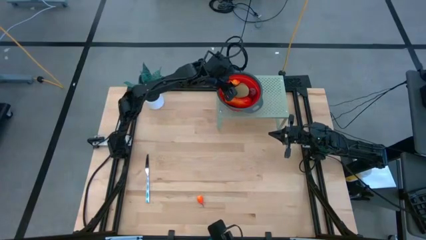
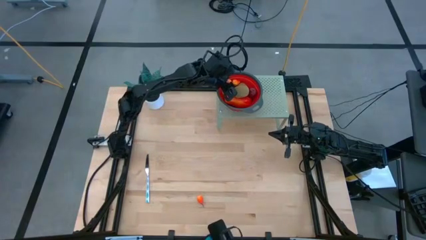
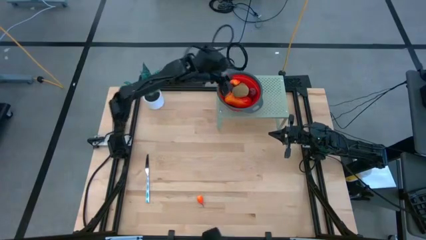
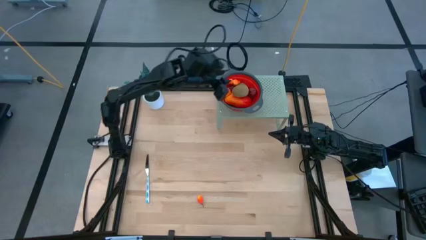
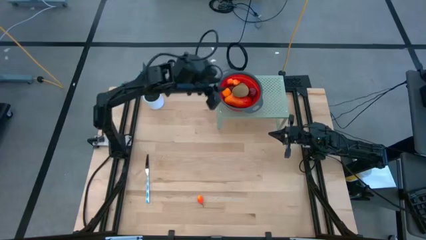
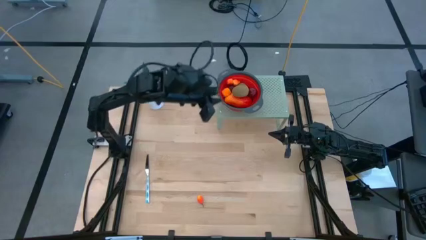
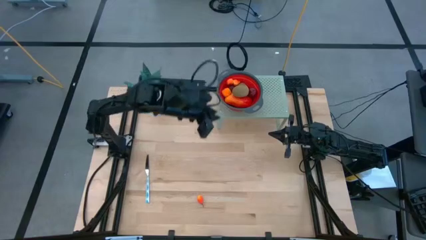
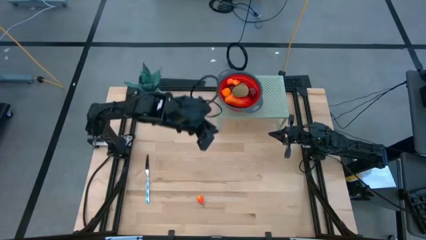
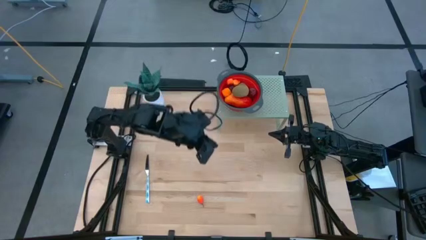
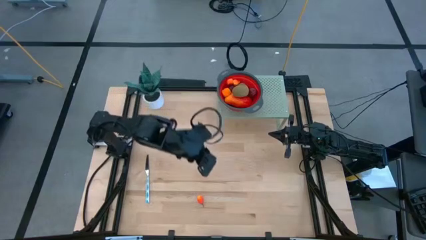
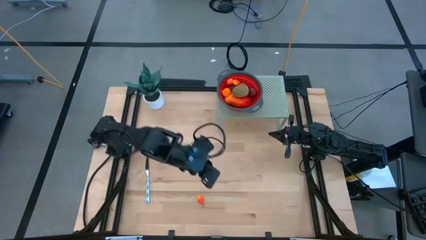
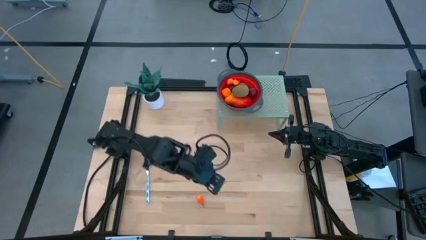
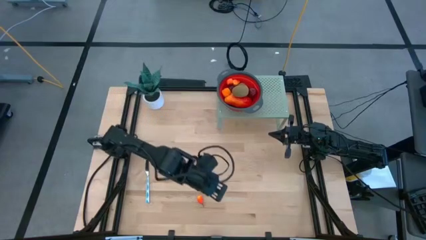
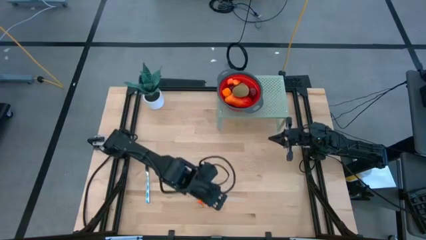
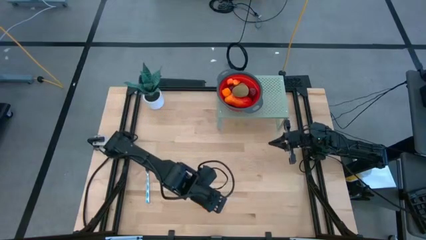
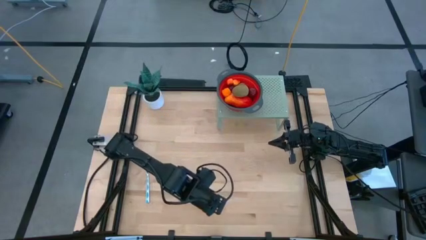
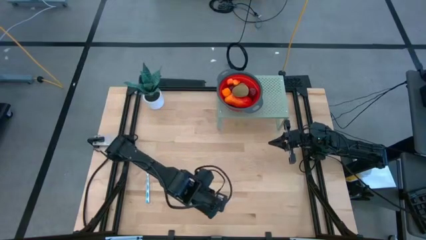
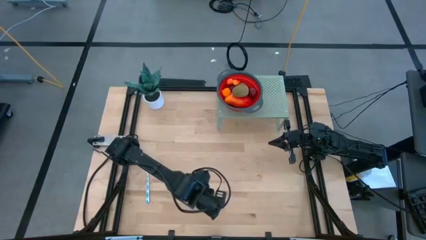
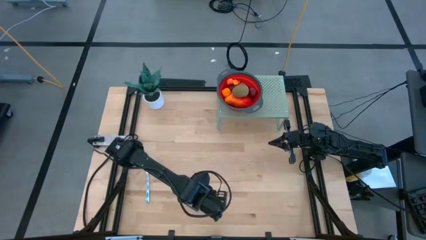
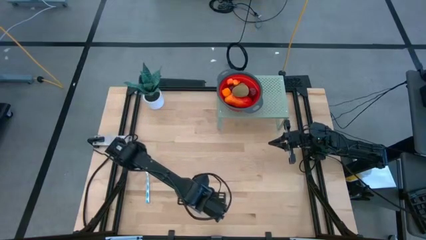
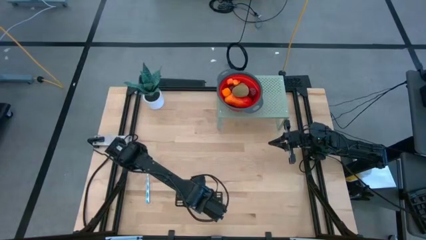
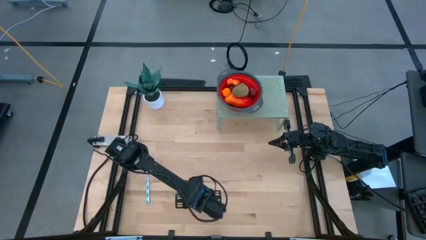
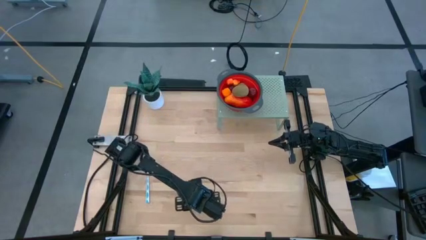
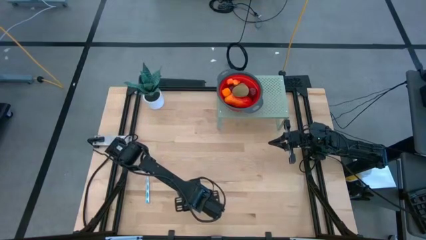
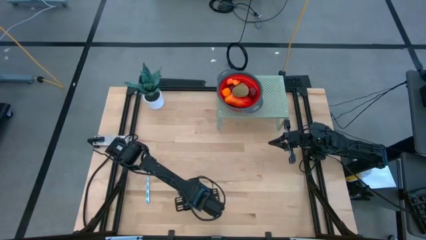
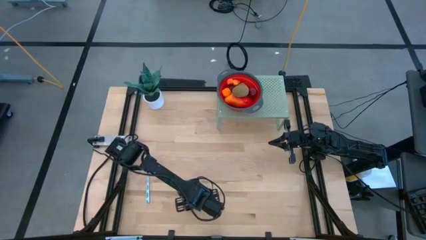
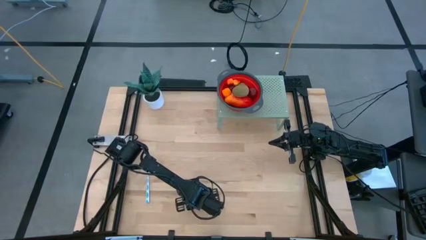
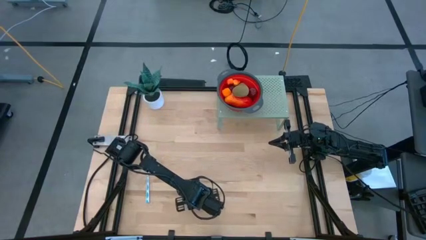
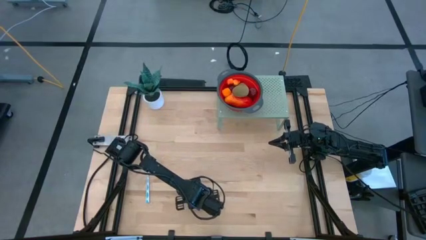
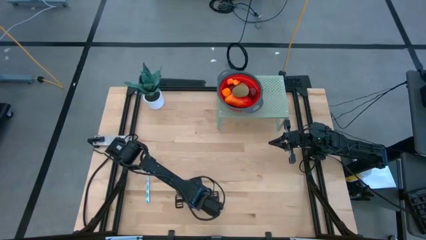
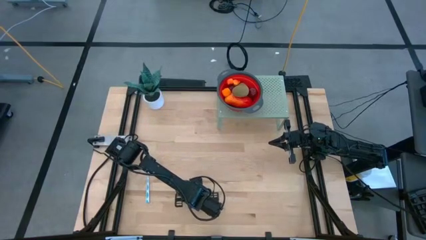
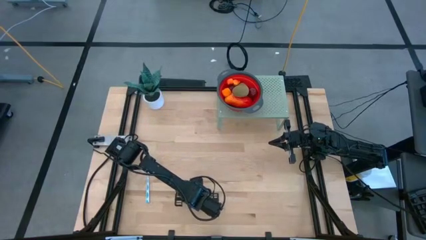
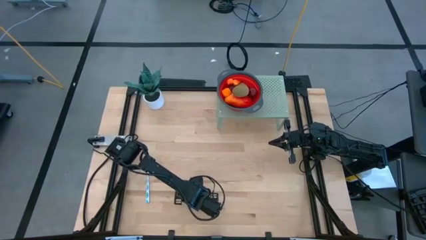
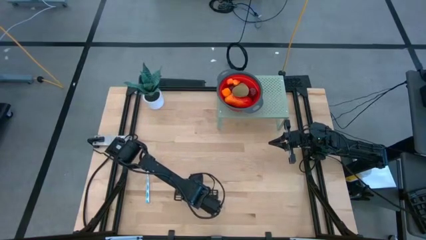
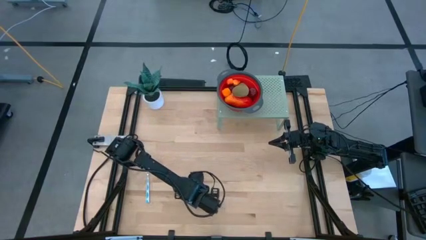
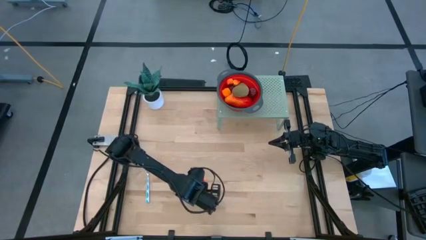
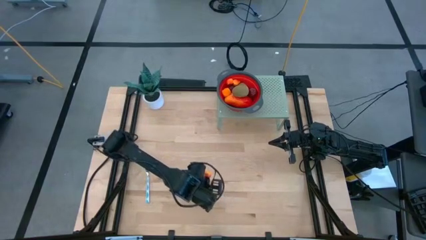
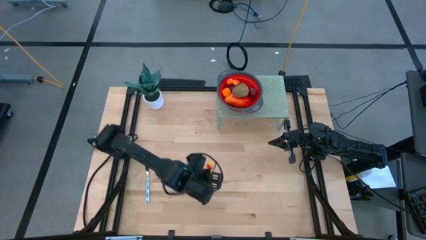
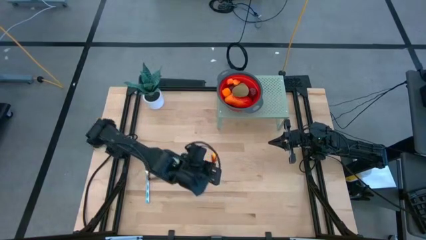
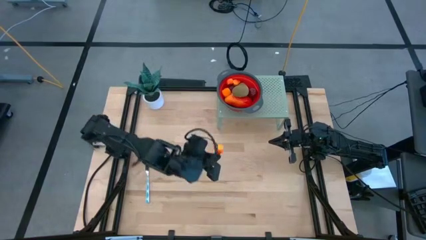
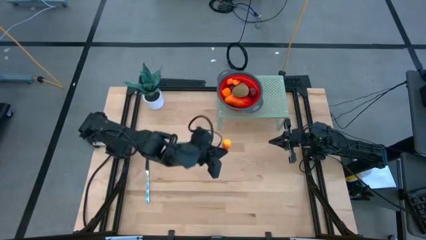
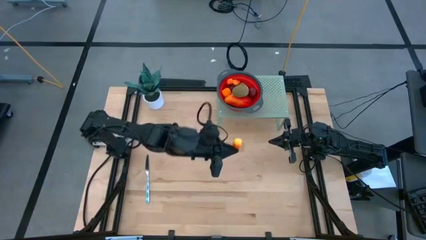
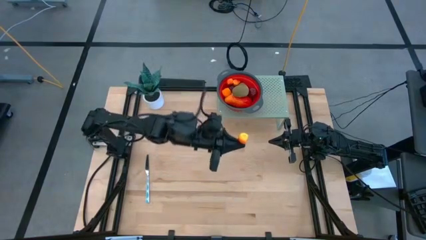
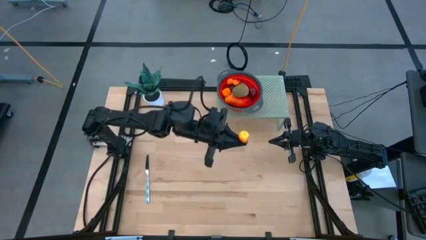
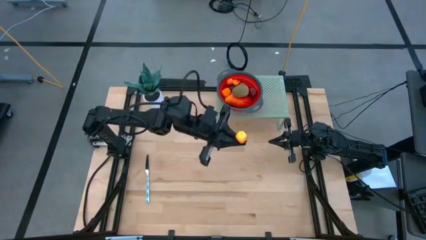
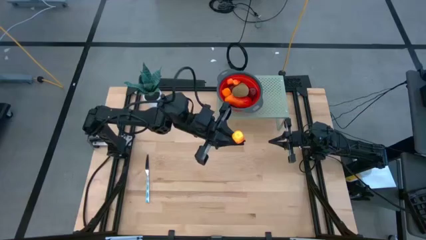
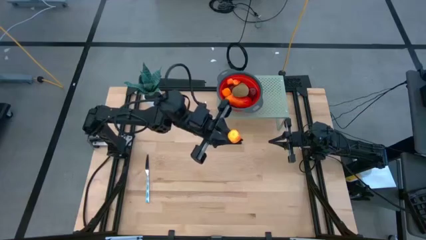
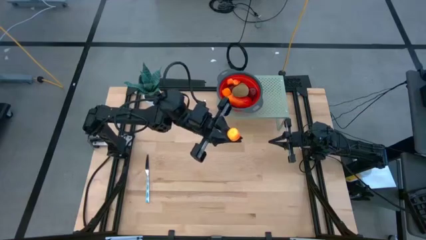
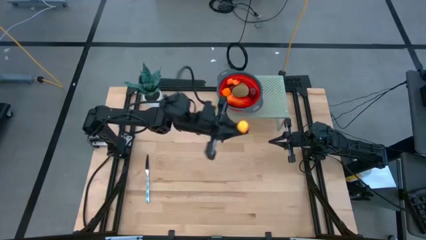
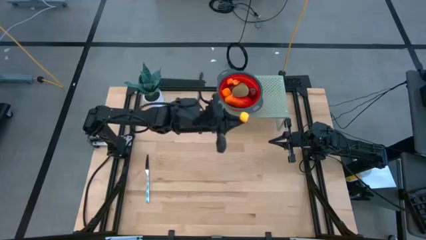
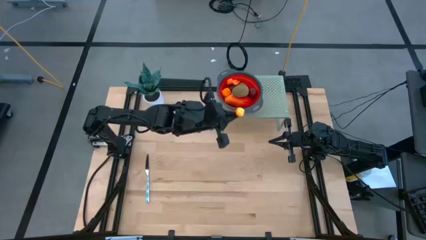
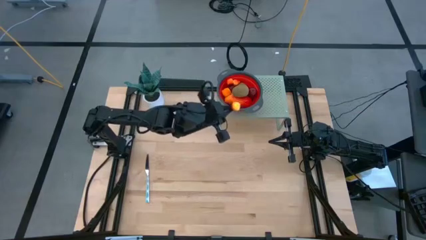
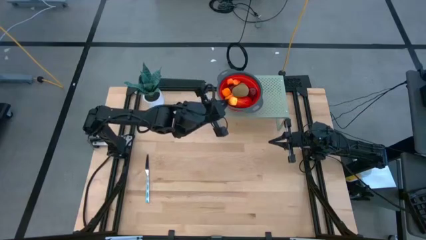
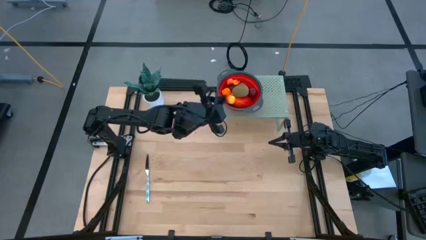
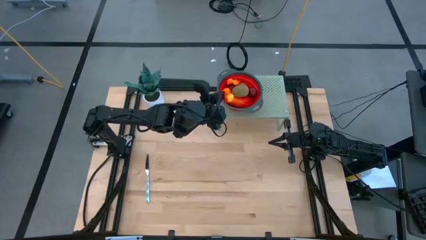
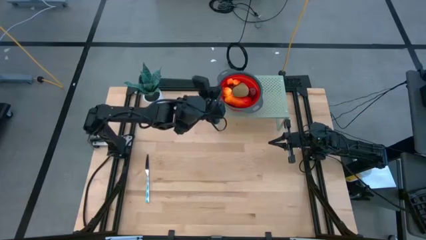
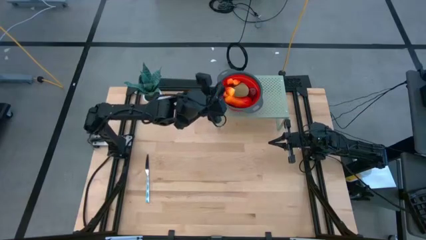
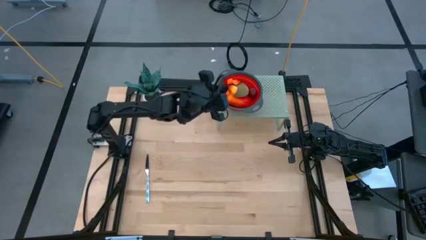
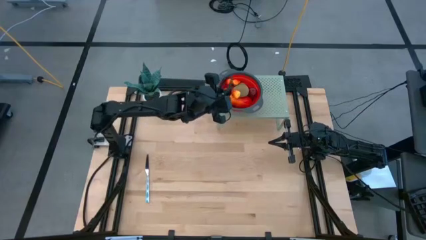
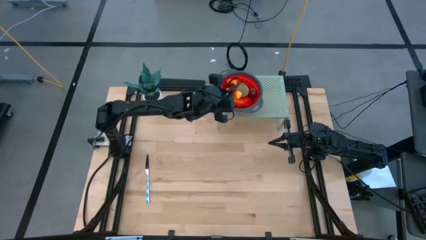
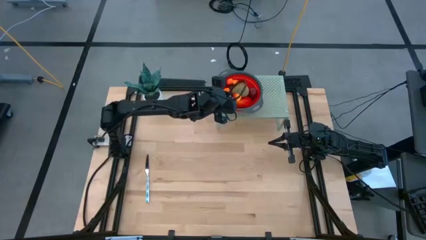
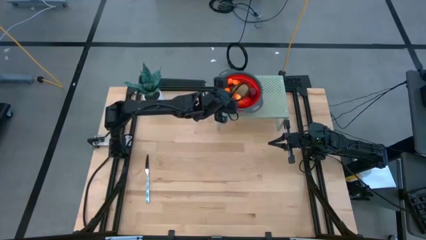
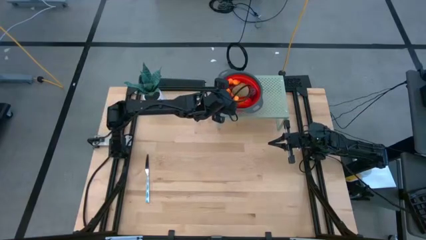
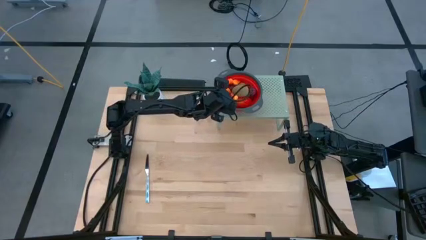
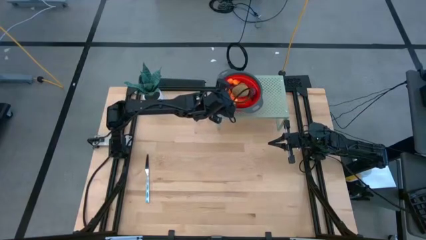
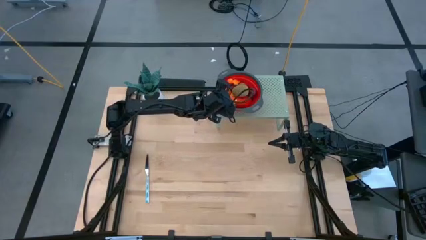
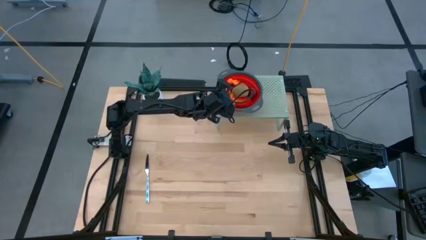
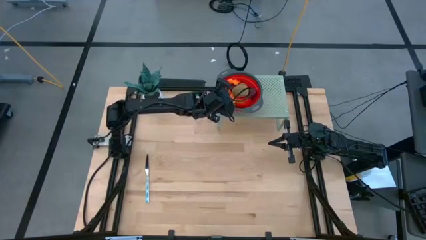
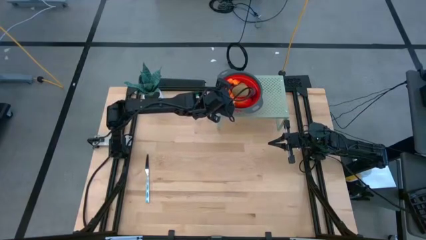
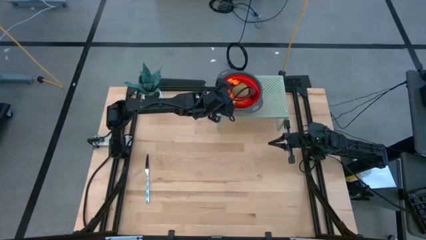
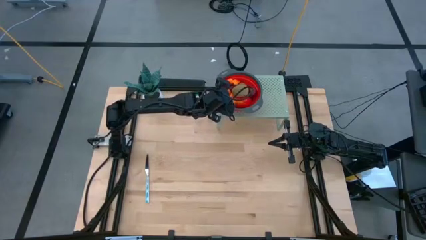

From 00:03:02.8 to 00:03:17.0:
Task: Pick & Place Fruit
Put the yellow peach into the red strainer bowl on the shelf

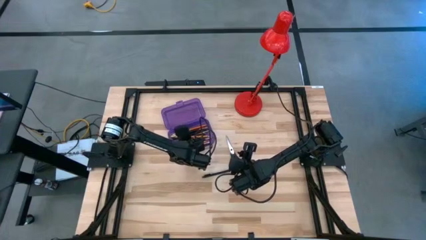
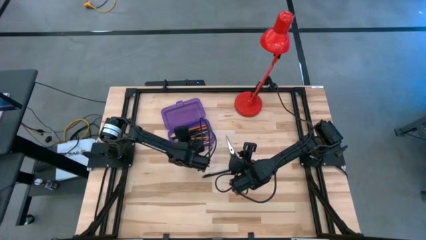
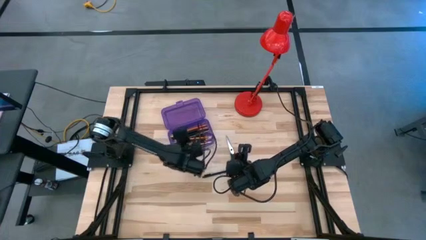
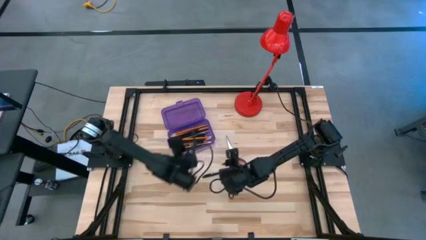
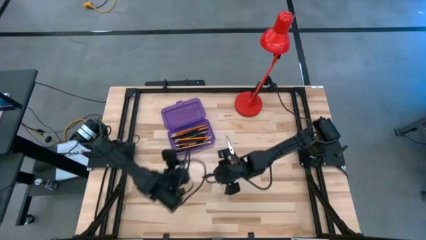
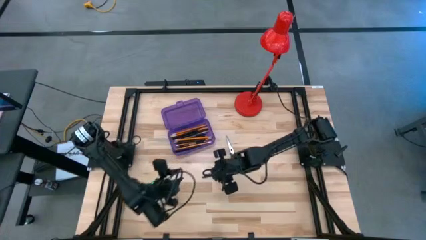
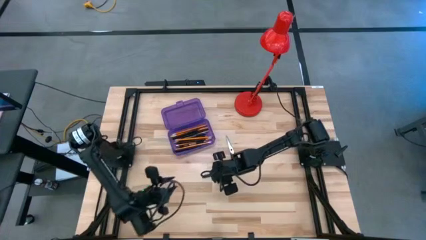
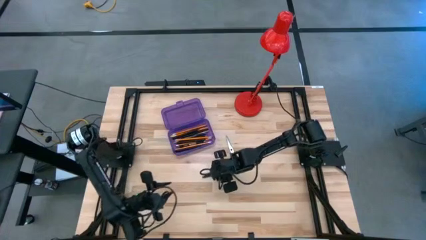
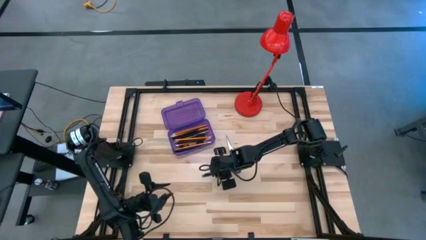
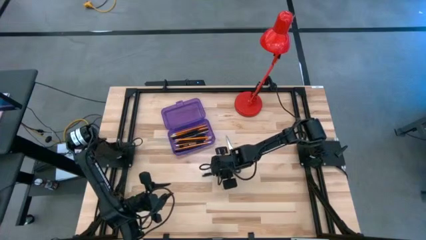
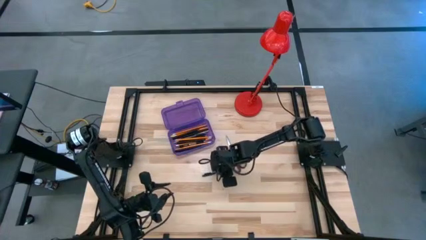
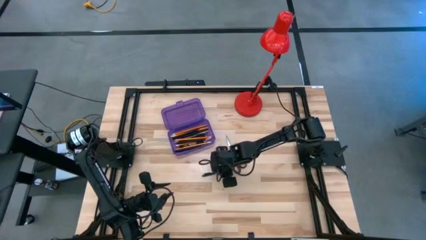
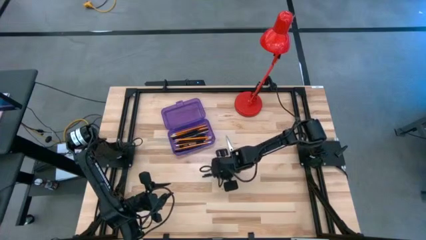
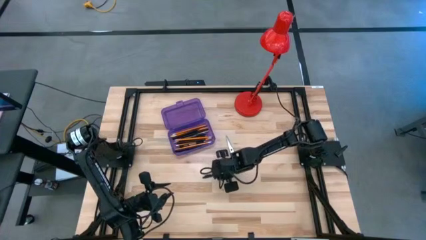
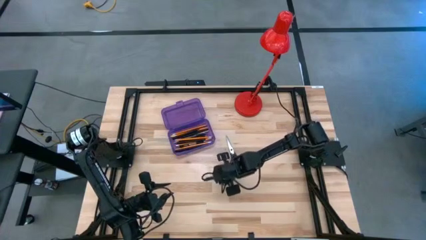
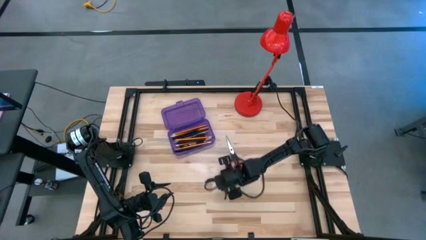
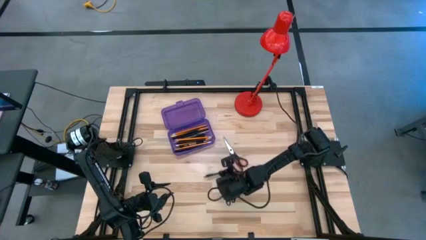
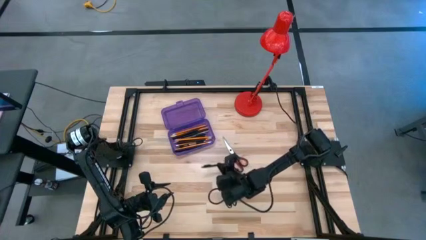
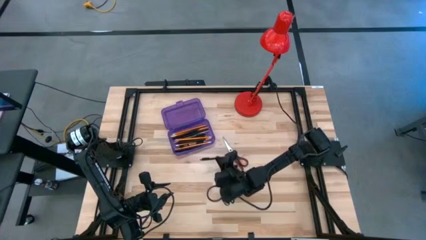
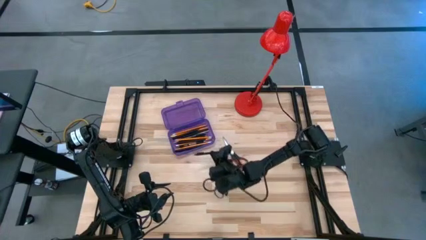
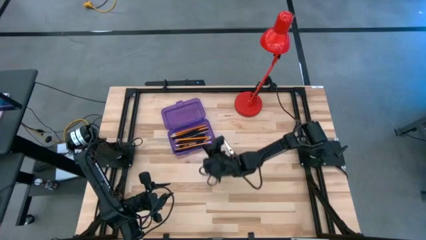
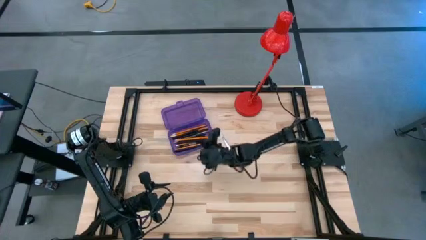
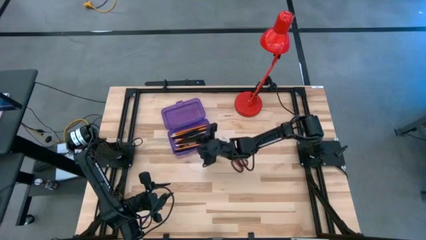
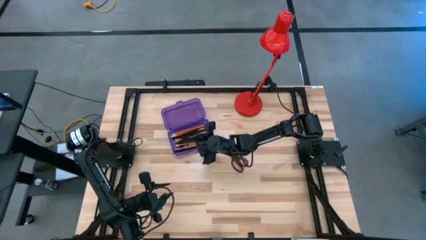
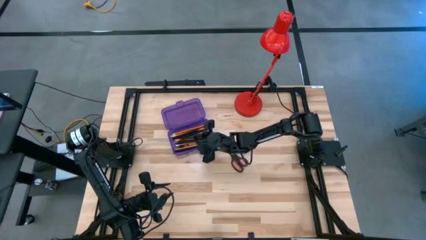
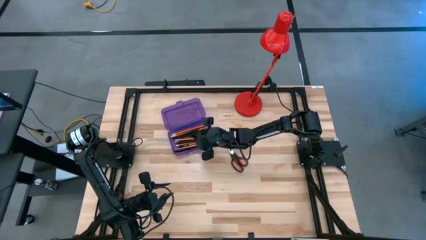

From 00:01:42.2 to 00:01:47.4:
Task: Pick & place school supplies into a supply box
Put the black pen into the purple supply box
